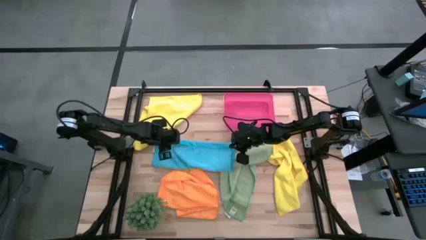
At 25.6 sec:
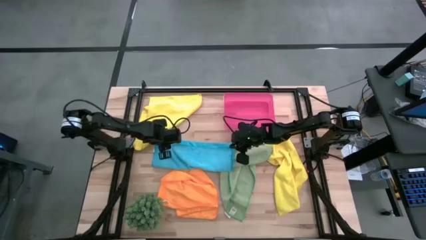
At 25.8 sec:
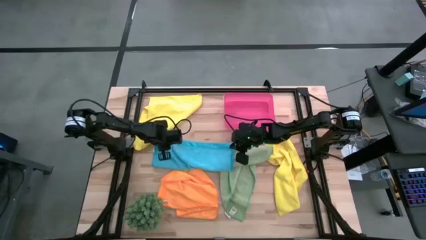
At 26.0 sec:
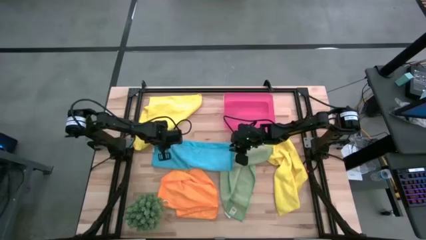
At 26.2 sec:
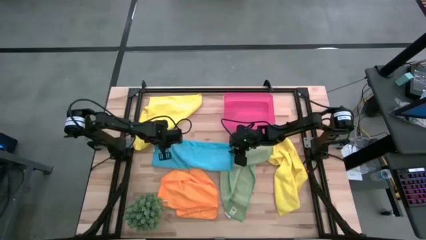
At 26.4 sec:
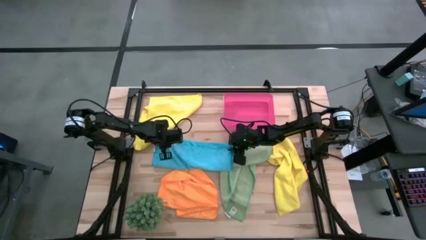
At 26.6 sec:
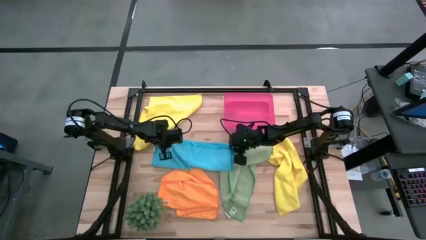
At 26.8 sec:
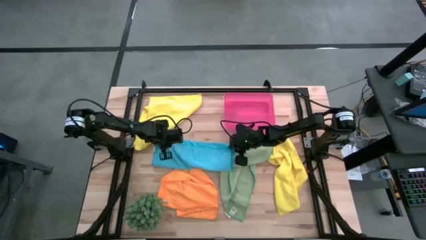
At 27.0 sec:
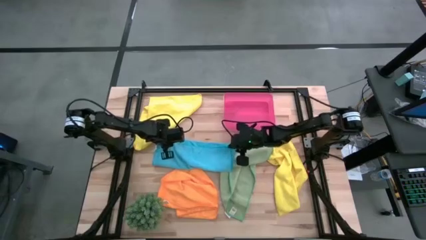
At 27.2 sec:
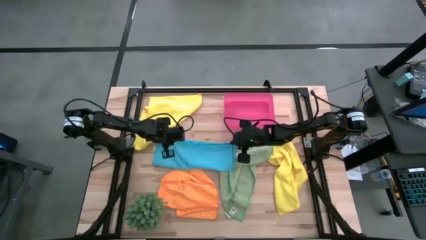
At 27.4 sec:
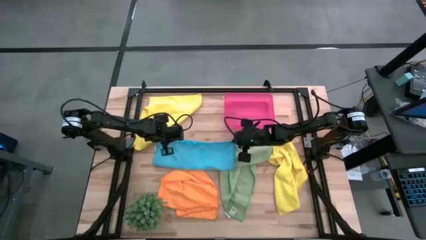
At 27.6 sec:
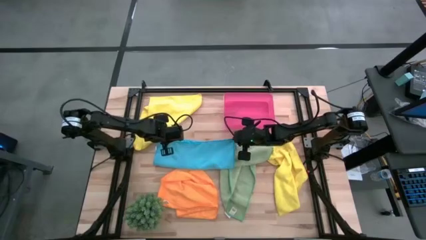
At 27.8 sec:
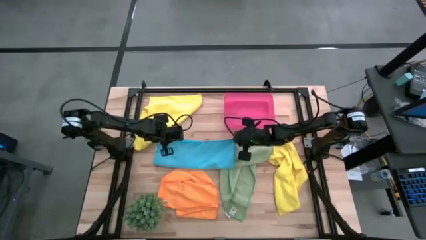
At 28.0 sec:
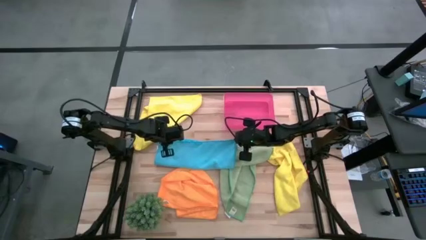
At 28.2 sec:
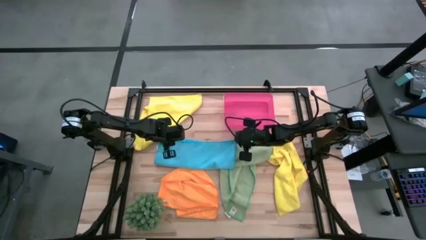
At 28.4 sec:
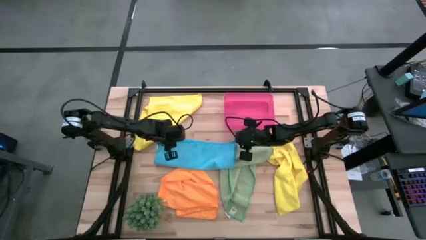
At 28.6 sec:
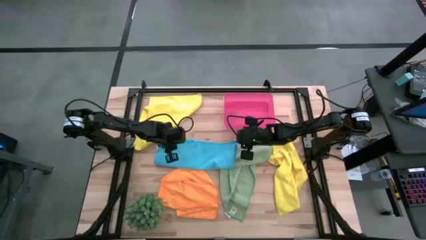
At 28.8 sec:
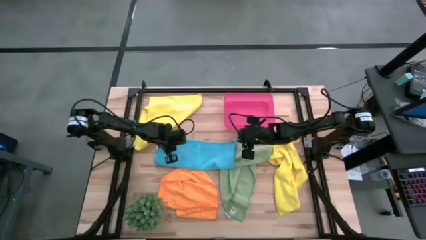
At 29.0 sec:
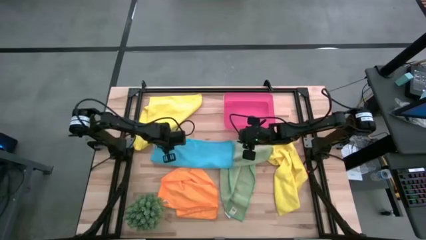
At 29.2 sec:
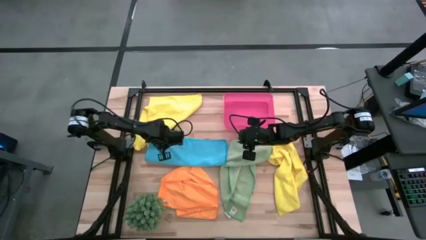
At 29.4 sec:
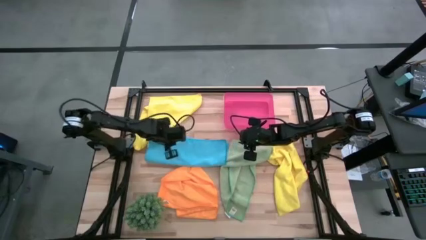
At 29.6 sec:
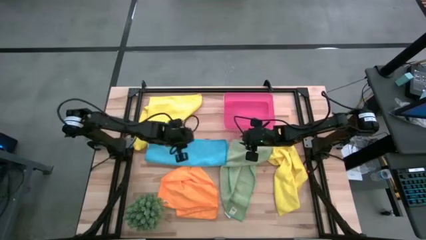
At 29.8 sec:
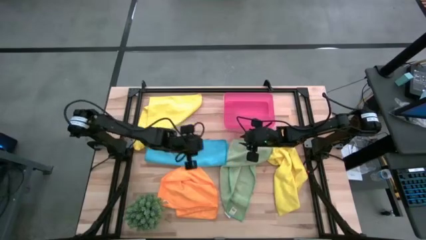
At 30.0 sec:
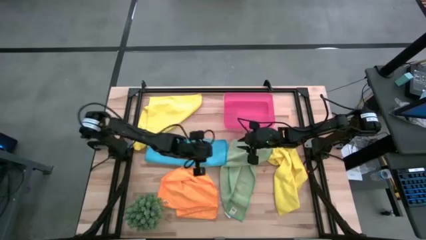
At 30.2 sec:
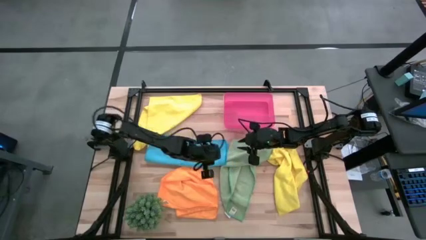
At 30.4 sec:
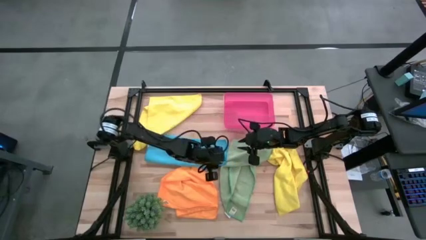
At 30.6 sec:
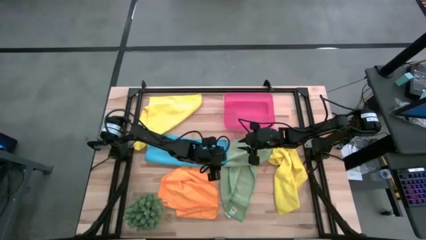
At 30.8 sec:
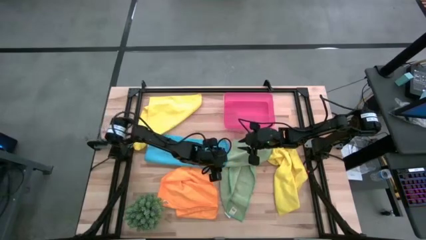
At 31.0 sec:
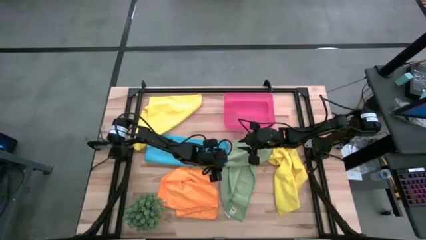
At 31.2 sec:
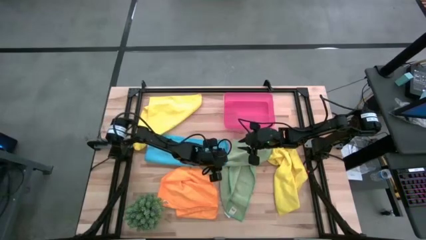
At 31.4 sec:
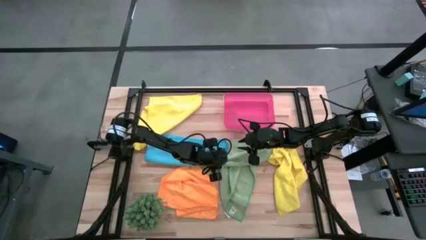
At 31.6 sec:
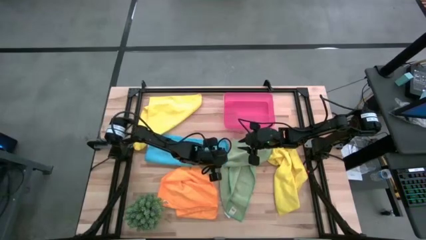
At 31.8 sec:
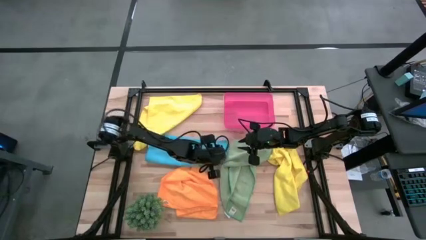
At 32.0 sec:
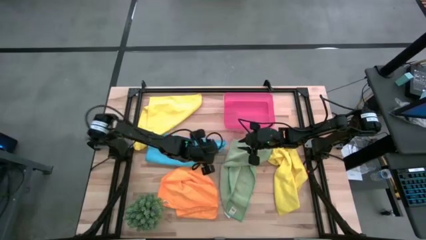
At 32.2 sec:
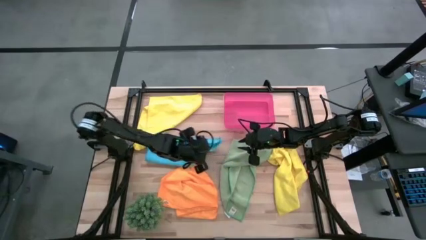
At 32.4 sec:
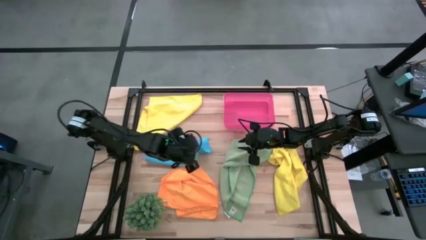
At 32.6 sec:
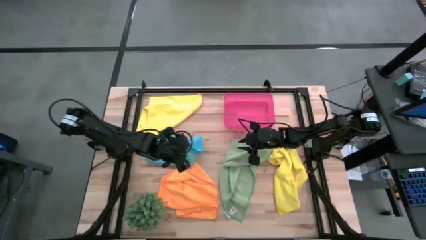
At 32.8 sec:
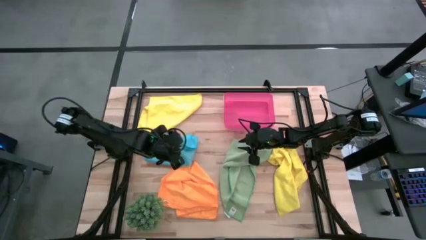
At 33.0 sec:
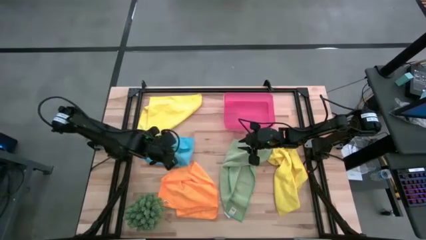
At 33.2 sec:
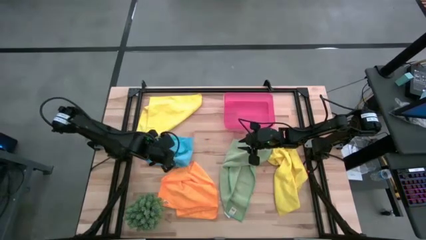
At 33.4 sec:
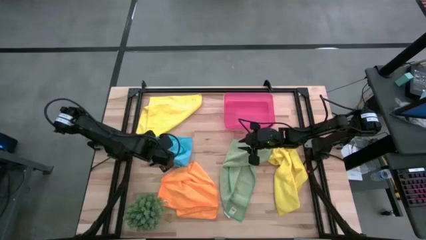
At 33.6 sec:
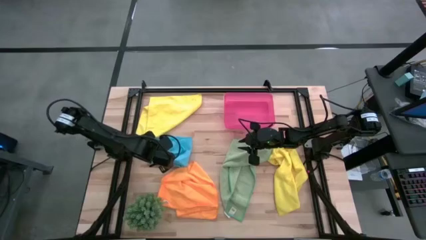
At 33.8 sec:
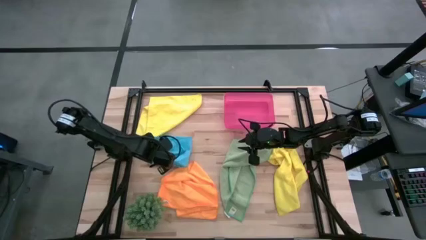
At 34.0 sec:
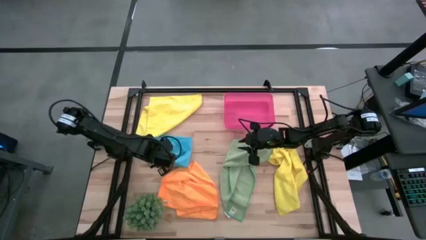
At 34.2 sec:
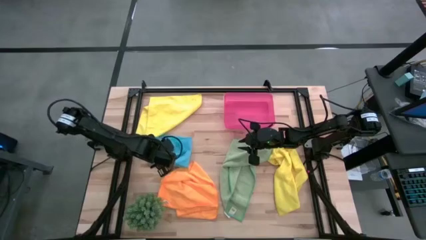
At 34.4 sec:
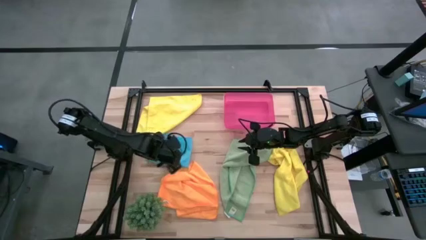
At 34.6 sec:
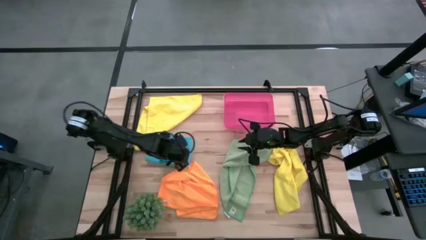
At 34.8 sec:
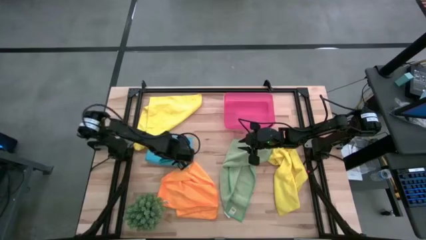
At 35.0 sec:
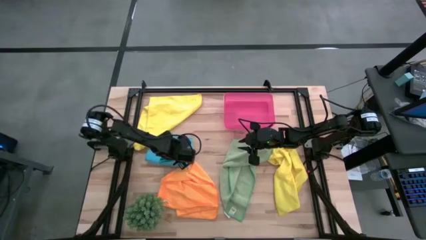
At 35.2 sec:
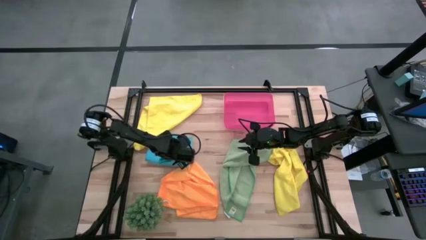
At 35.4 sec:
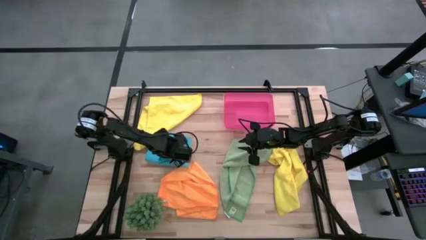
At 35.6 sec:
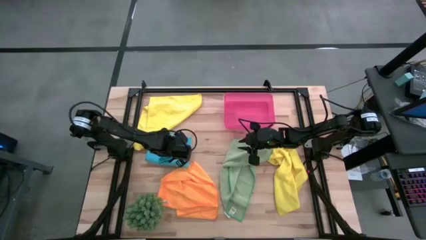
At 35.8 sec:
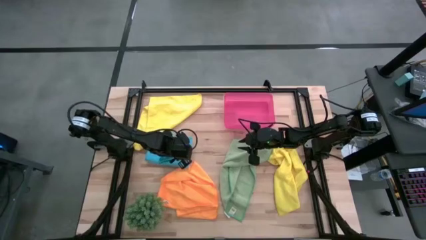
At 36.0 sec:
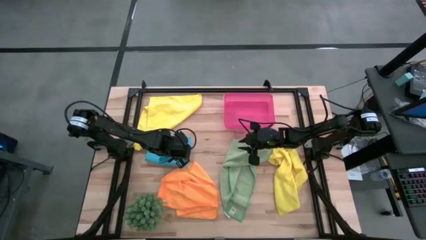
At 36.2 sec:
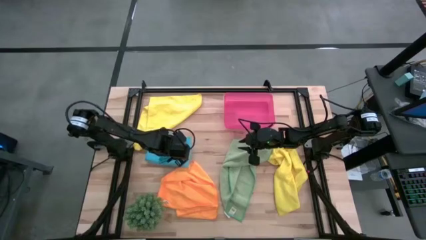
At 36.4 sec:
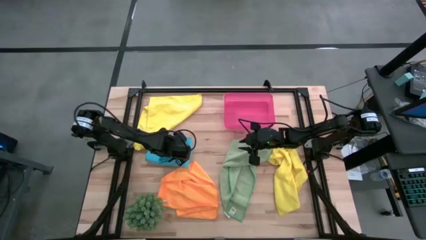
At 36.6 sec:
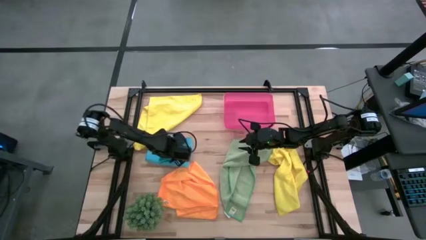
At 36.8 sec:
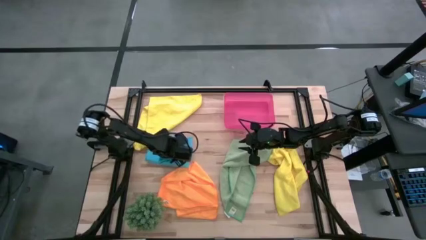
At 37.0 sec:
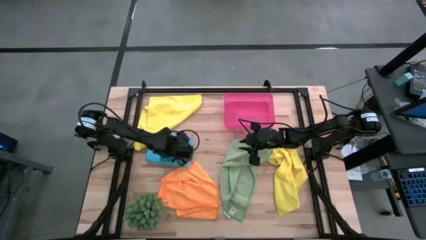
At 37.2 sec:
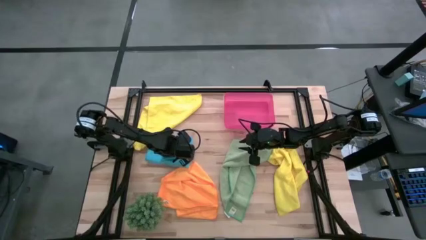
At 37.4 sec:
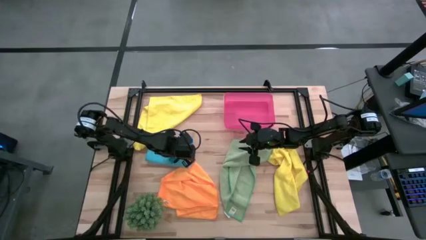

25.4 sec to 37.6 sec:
Task: Fold microfiber towels
Fold the blue microfiber cloth
